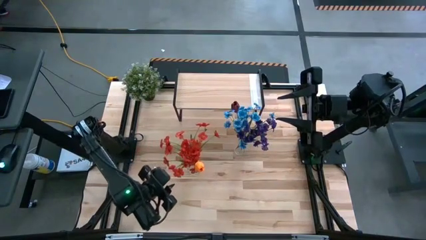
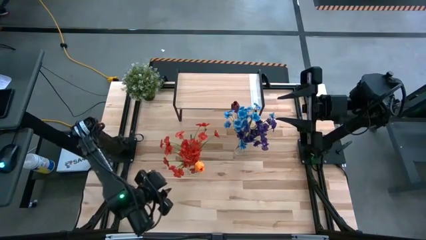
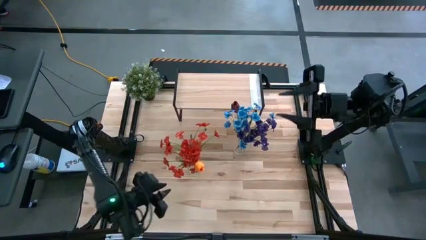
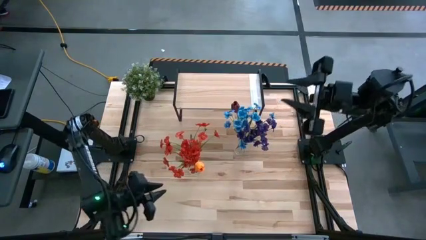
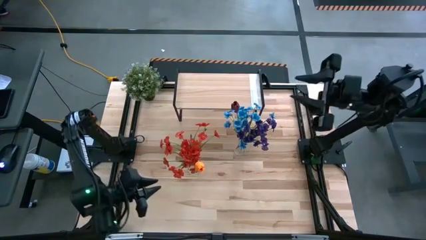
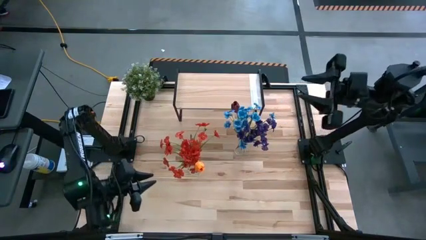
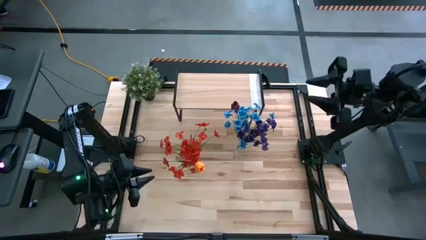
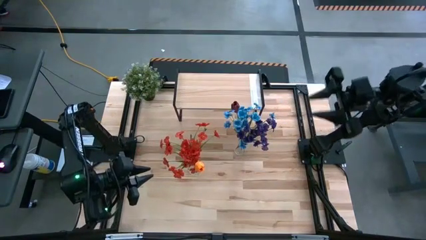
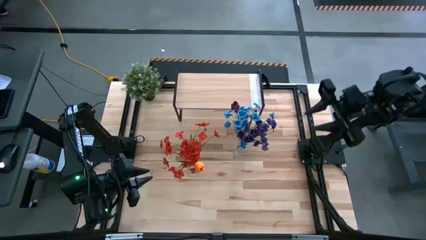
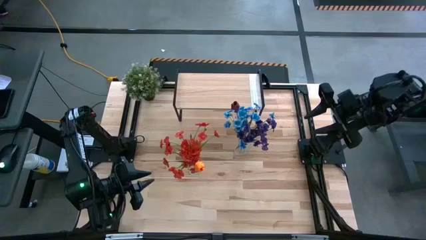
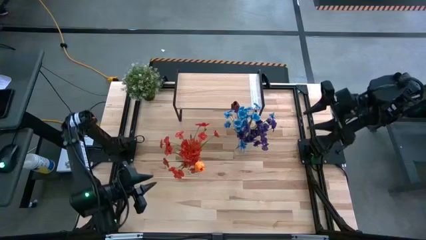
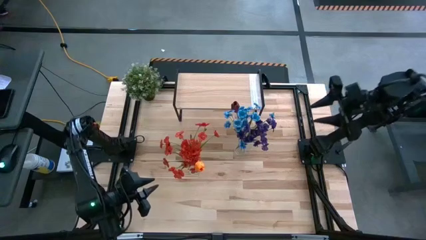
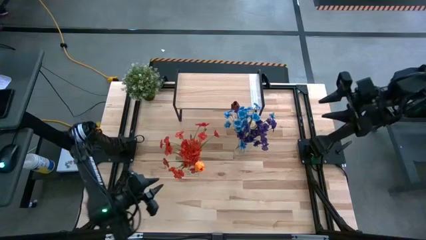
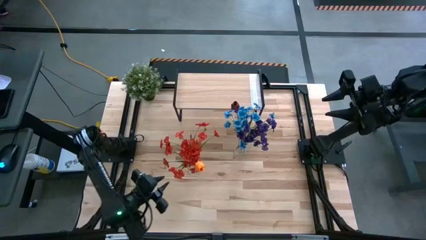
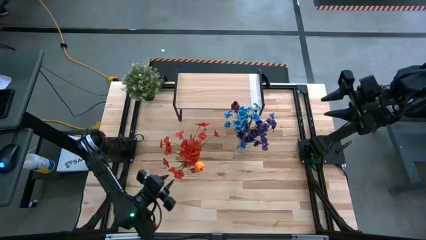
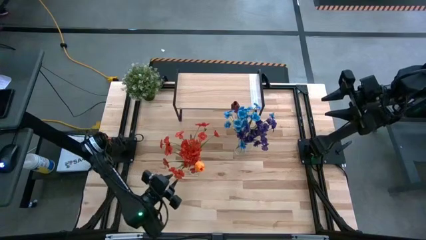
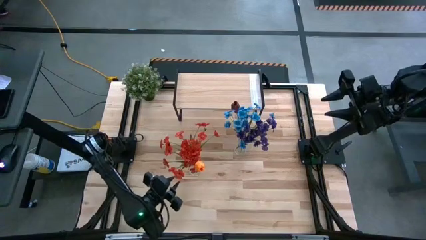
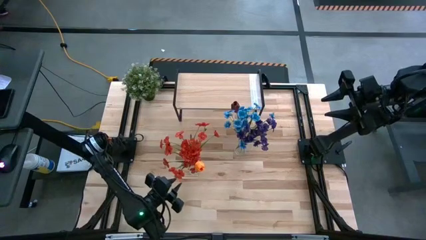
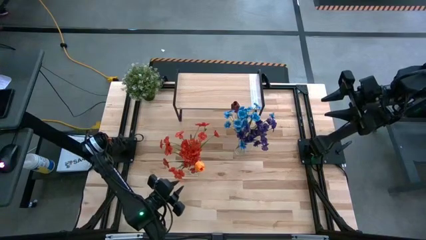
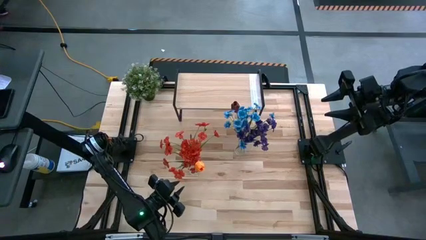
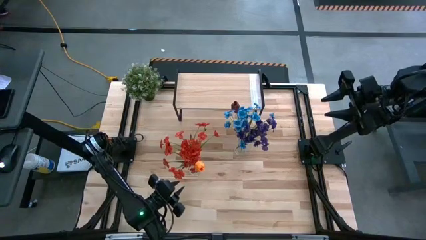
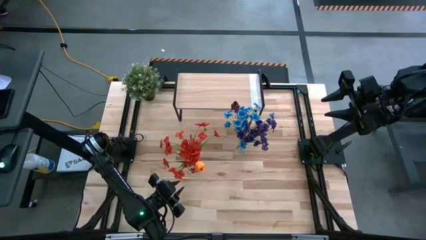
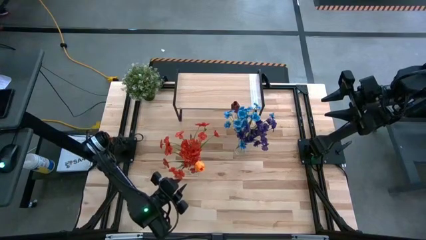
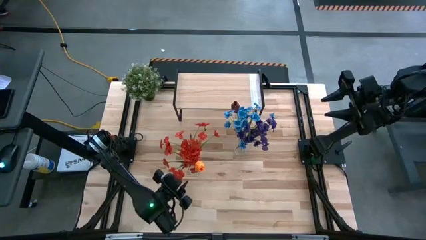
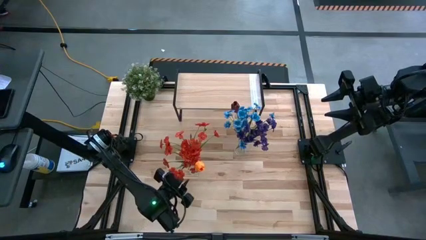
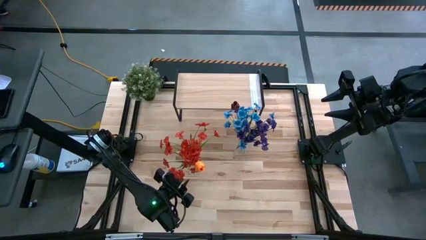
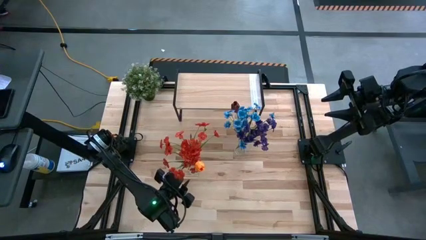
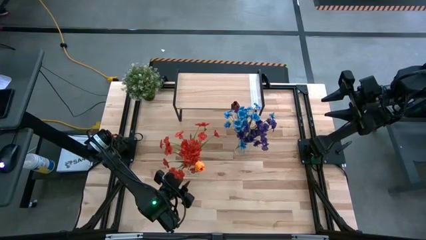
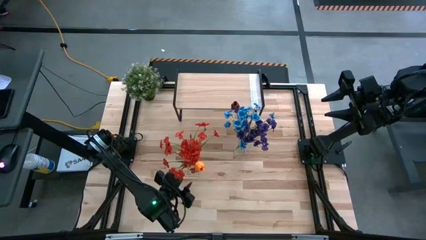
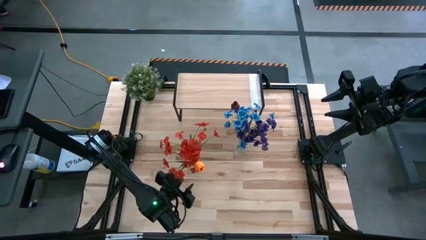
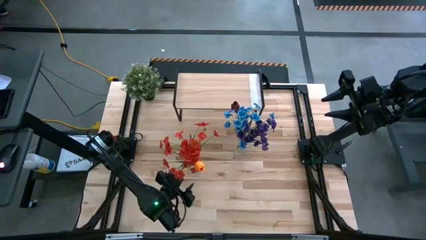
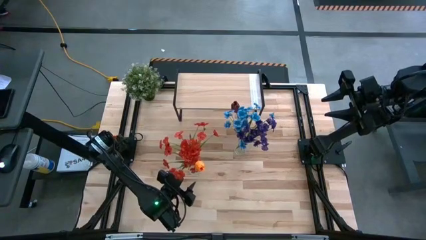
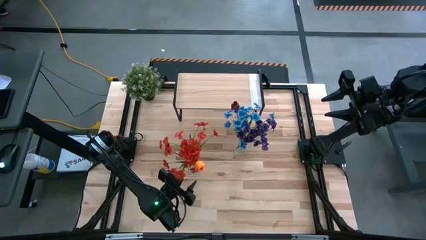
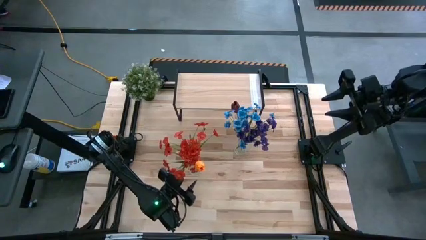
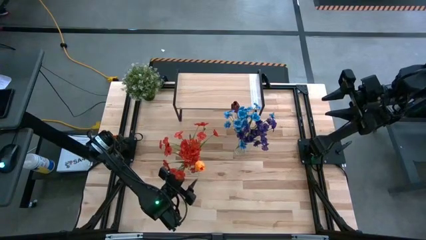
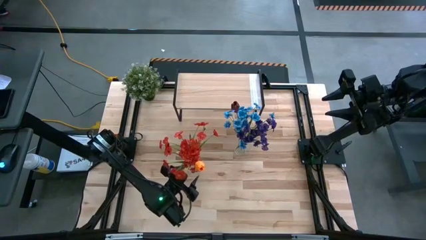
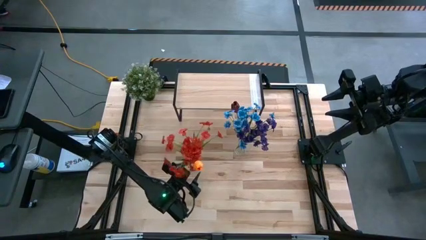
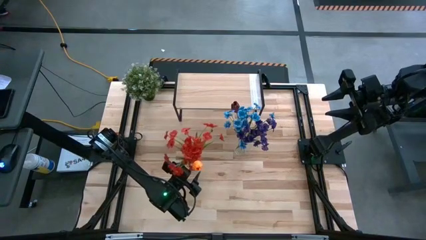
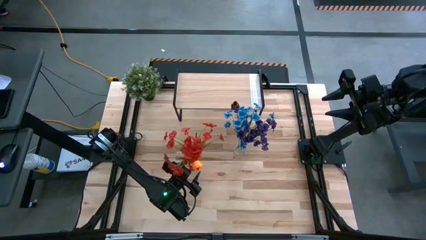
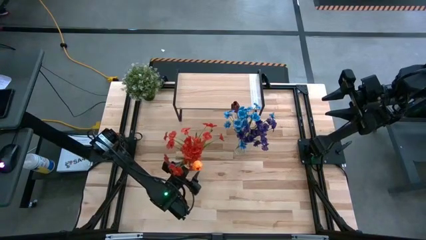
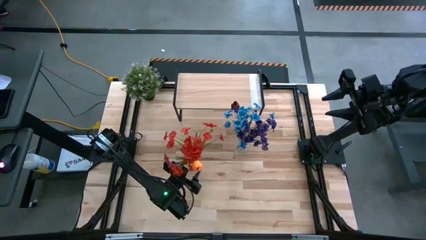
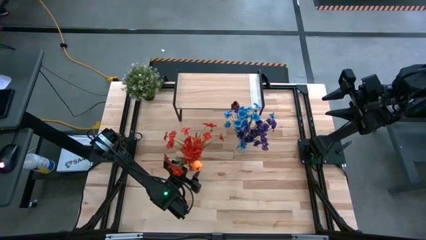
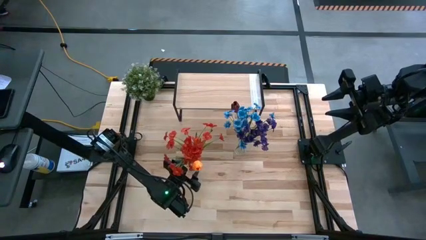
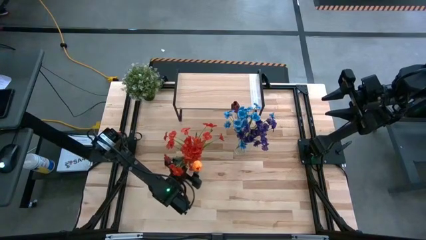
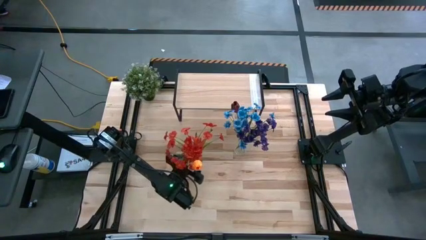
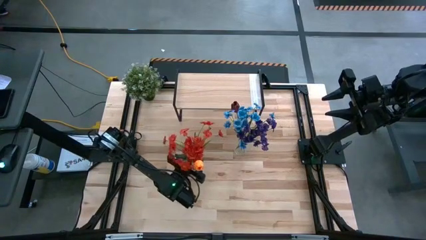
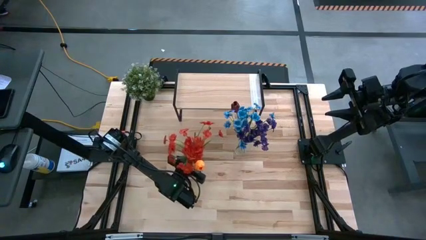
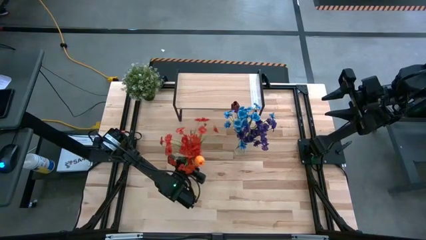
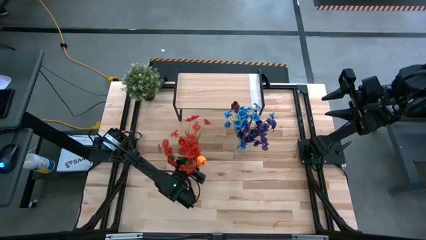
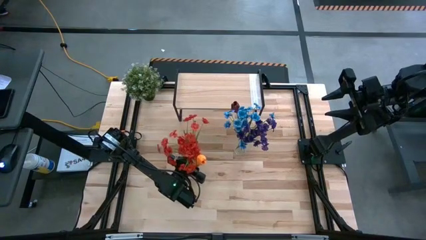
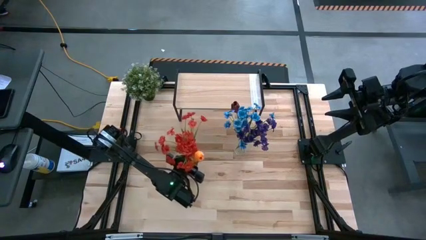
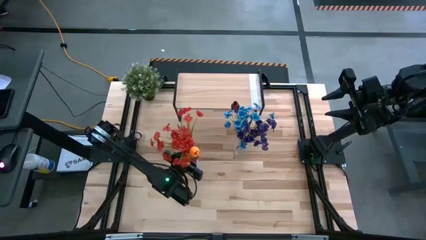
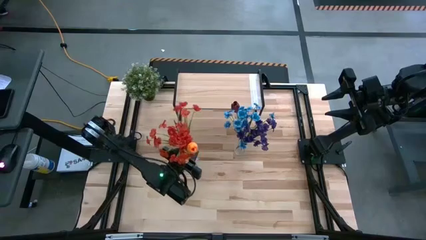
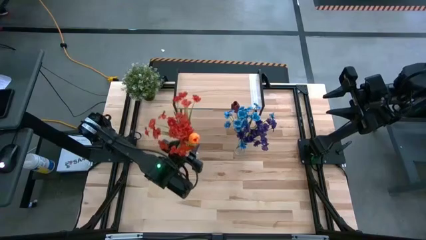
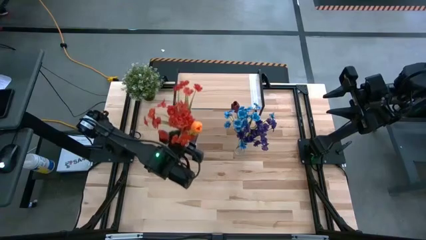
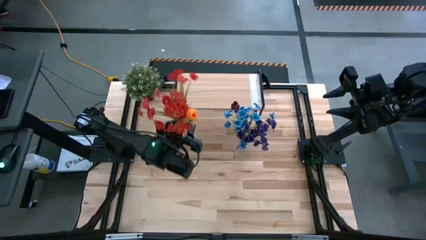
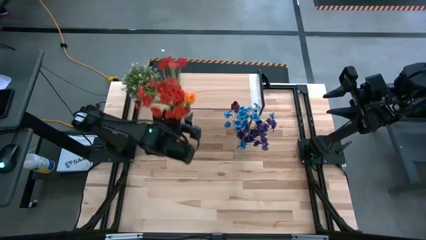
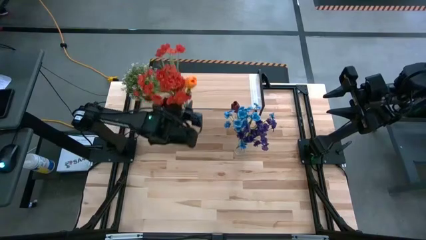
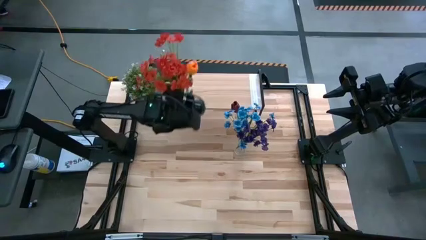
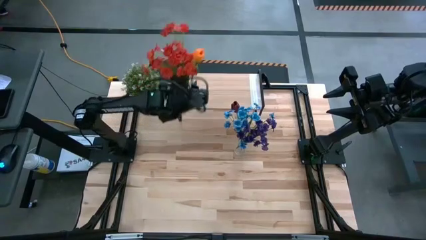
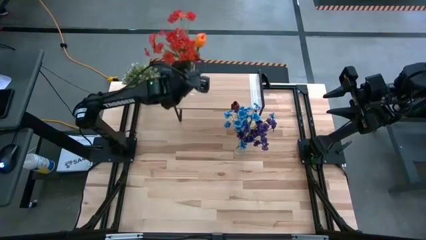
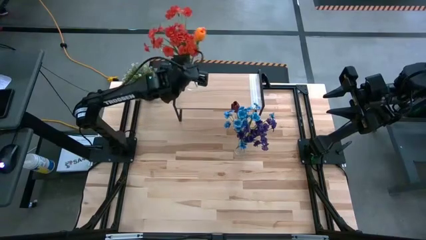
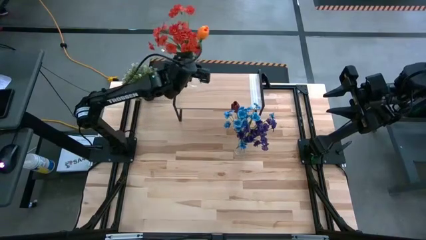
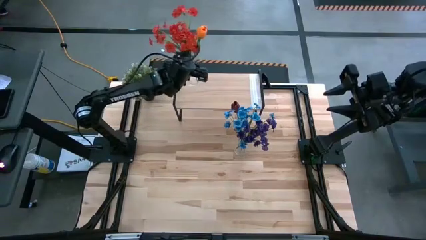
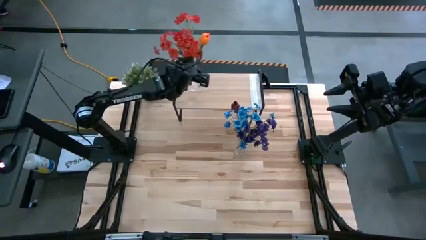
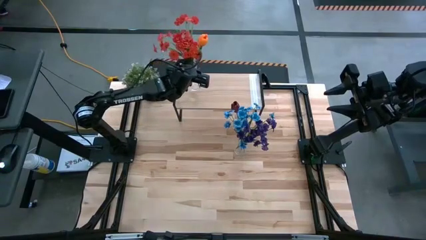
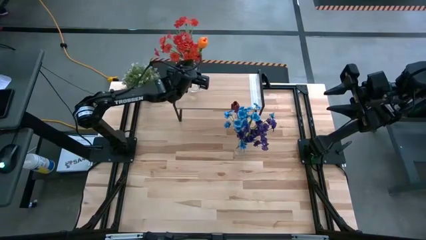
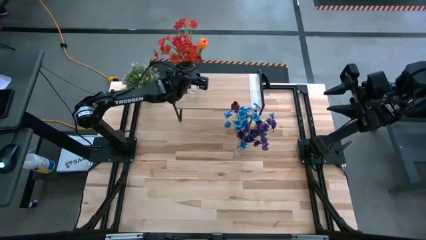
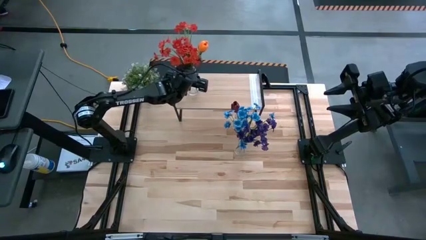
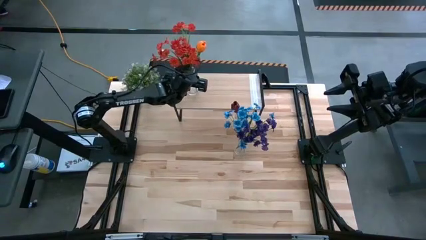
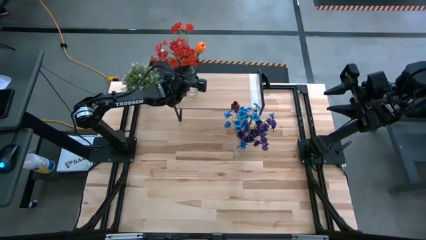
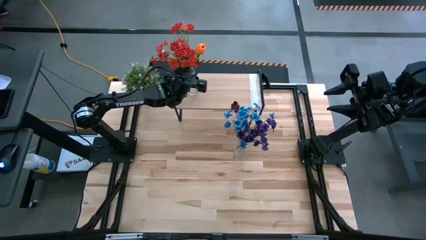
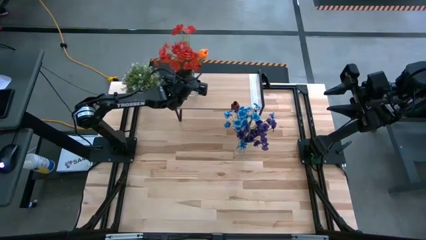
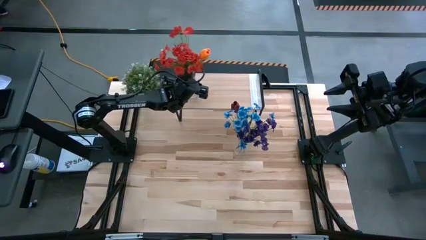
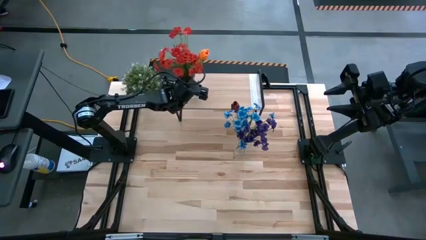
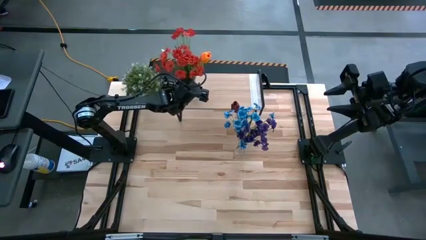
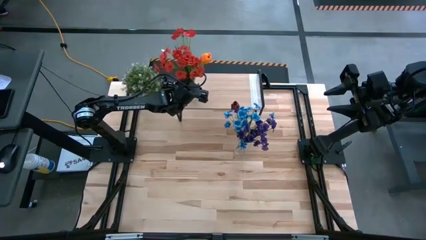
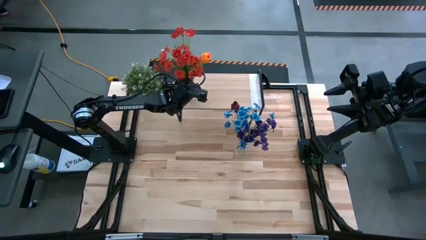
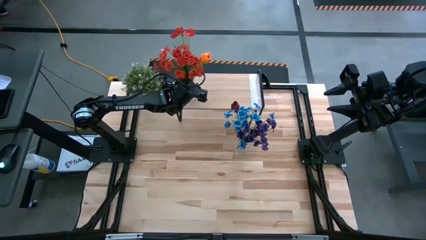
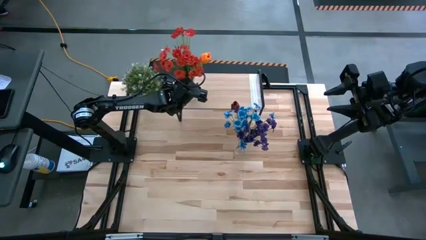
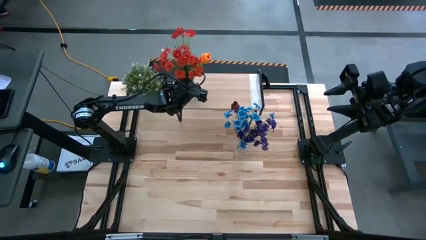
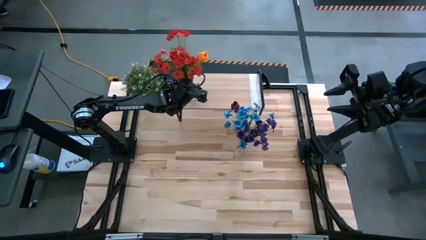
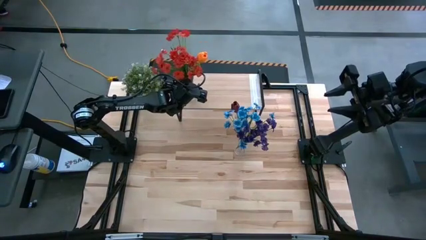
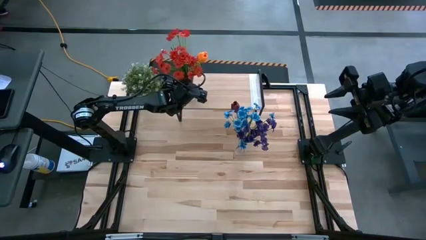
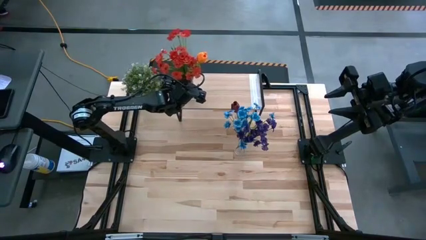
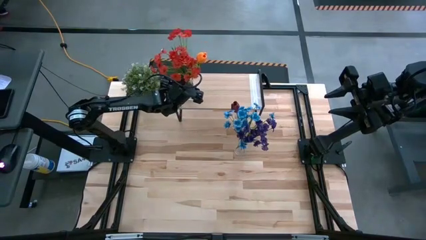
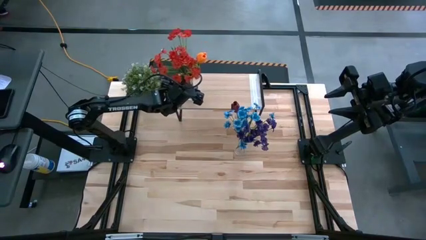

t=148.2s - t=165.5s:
Task: Pick and place flowers into a vace then onto a shelf
Put the left transparent vase onto the shelf
